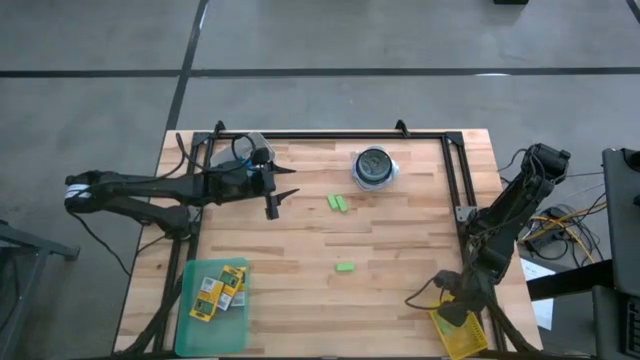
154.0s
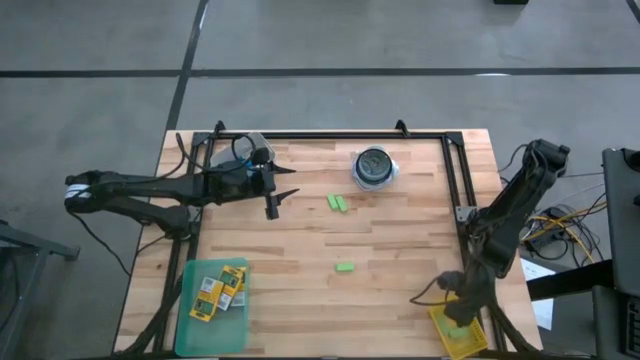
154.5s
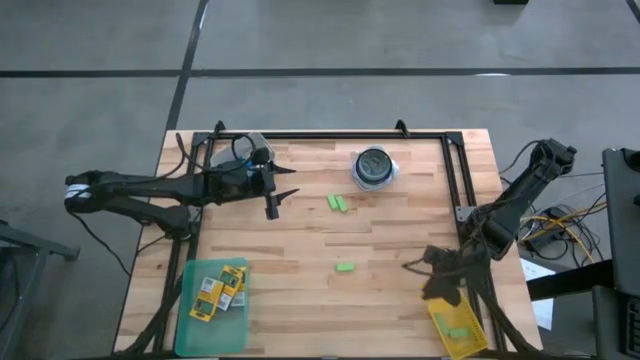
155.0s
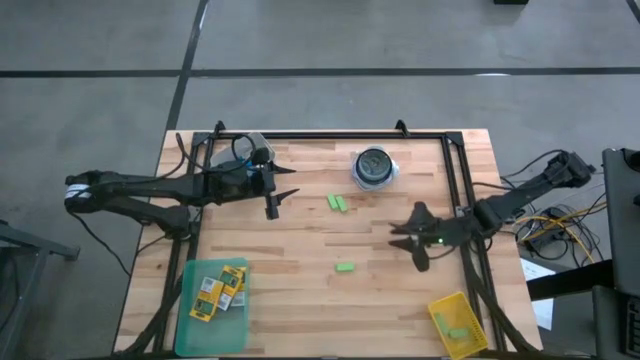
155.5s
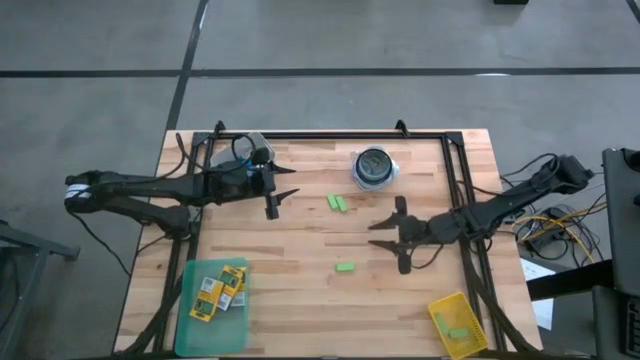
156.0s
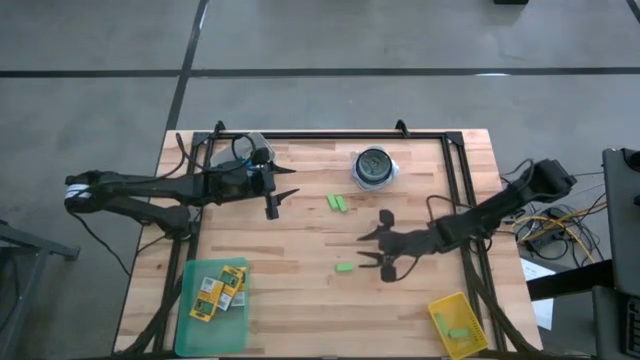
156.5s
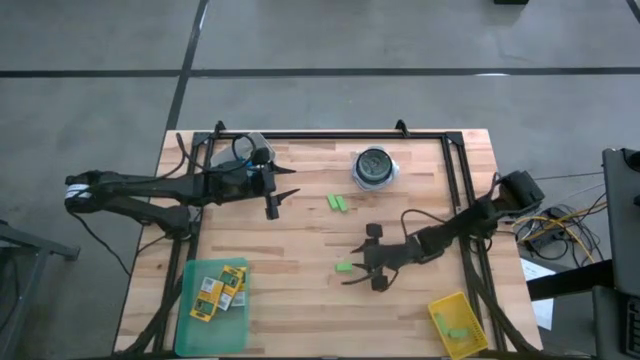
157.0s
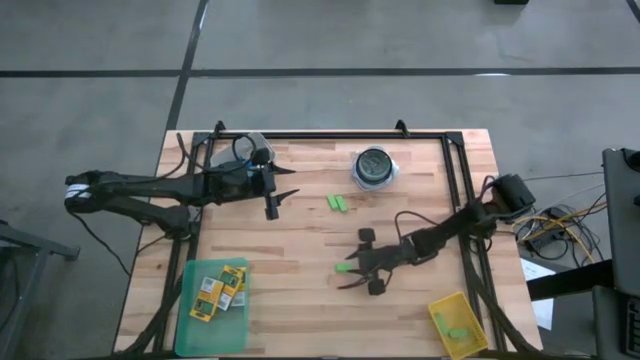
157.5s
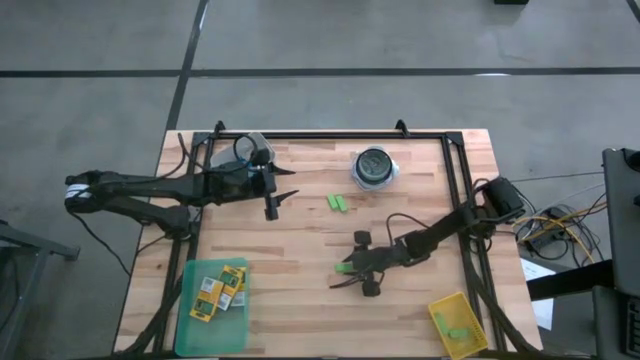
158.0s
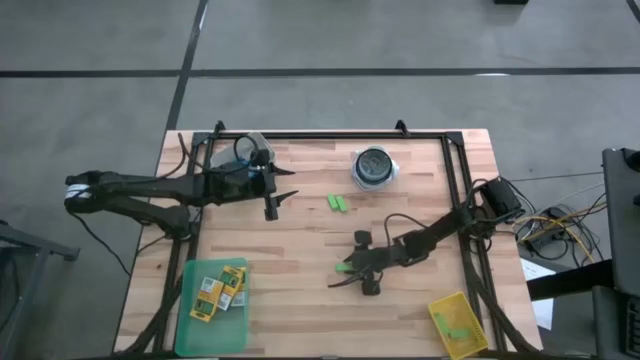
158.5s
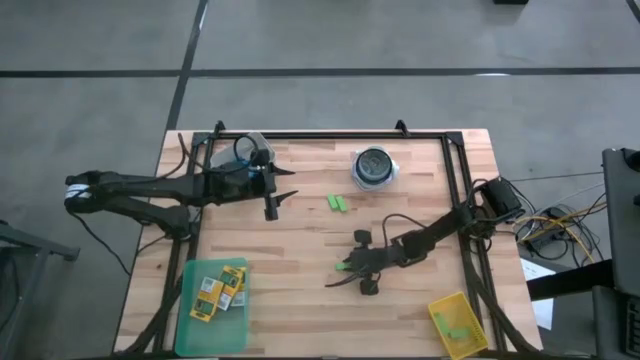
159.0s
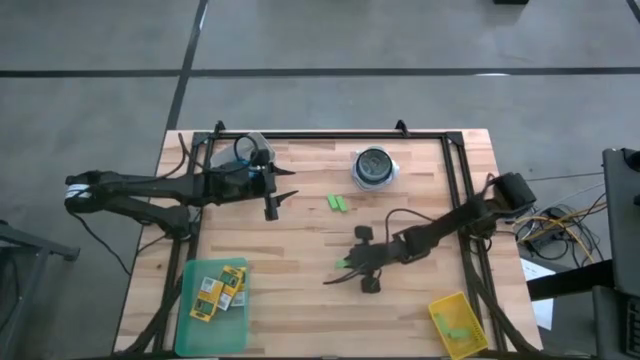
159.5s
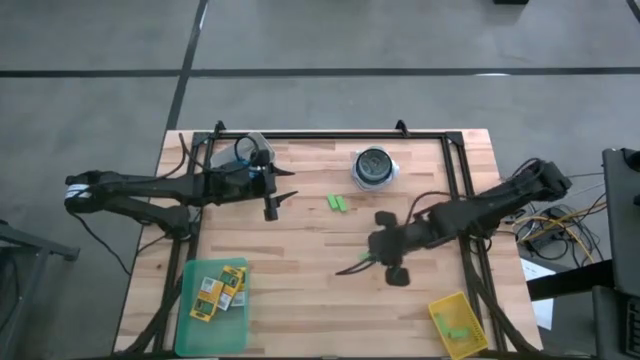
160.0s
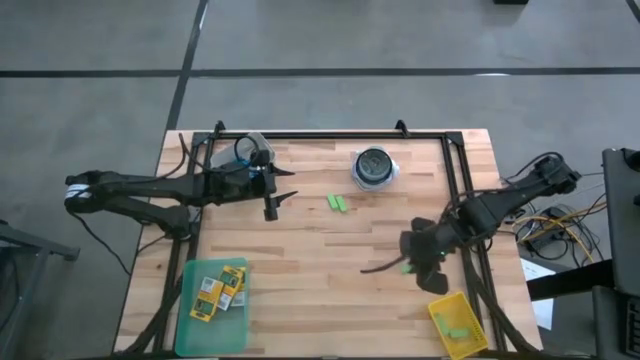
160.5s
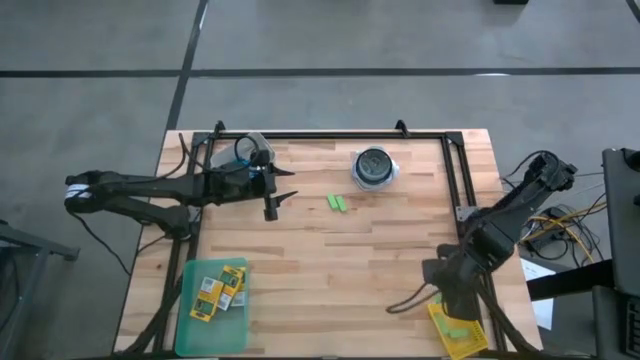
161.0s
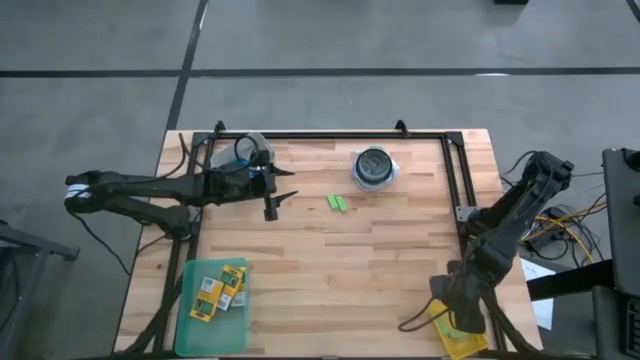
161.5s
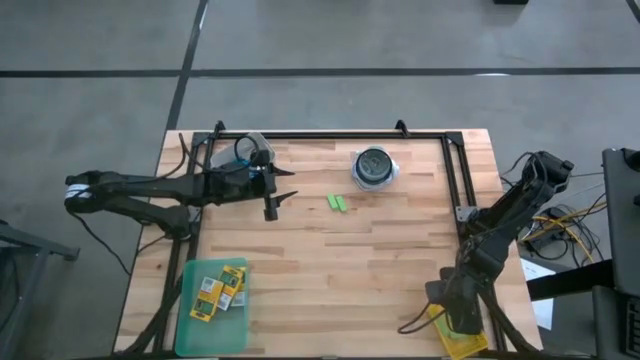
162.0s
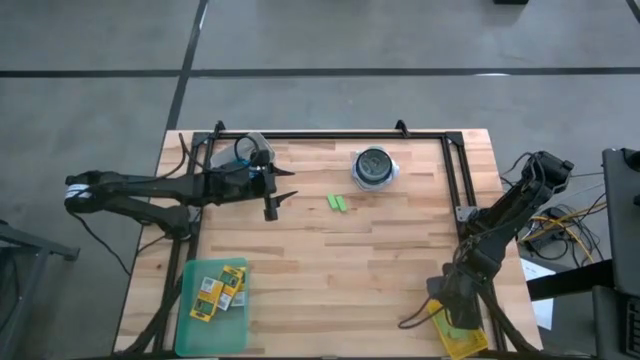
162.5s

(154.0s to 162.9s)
Task: Pick & Place School Supplies
Put the green eraser into the yellow bin

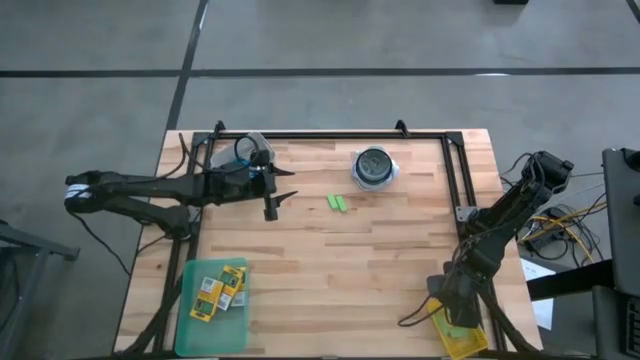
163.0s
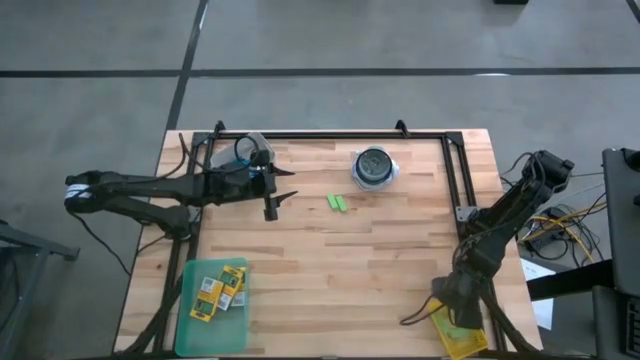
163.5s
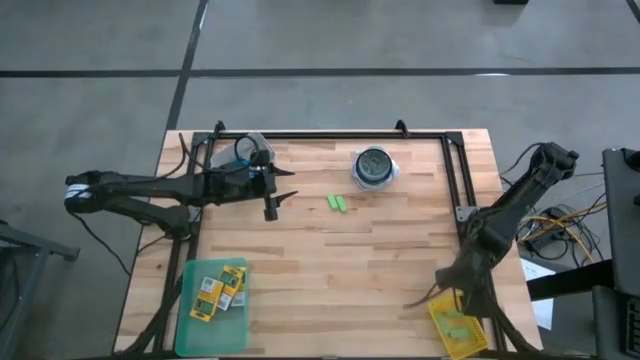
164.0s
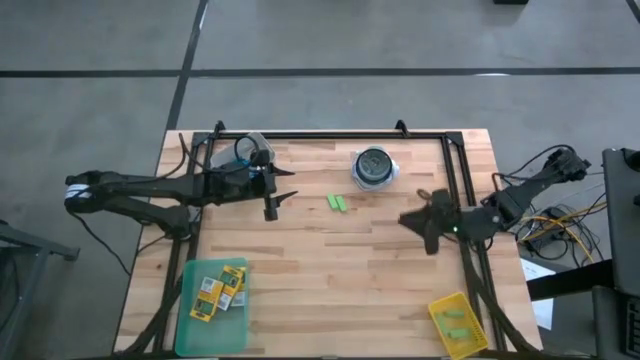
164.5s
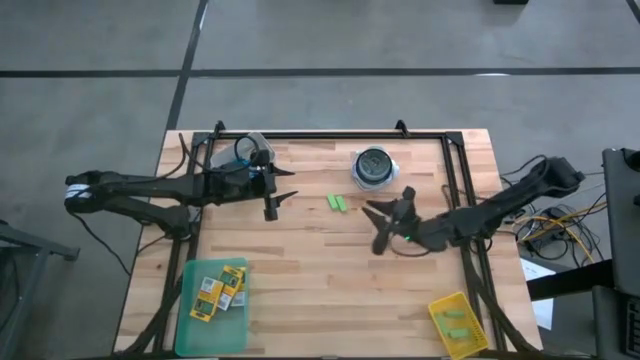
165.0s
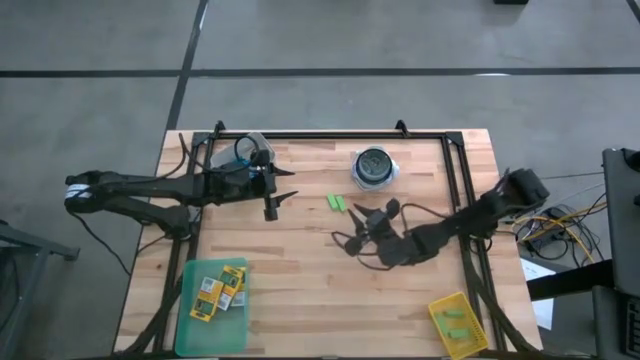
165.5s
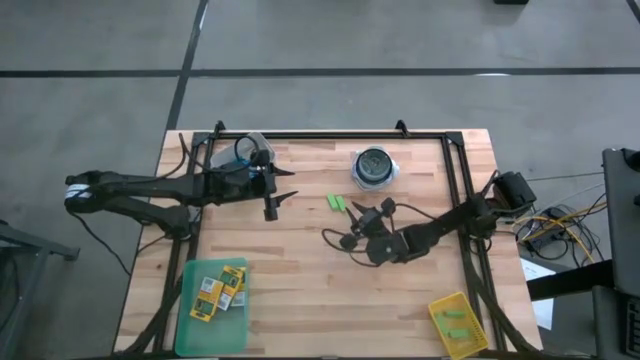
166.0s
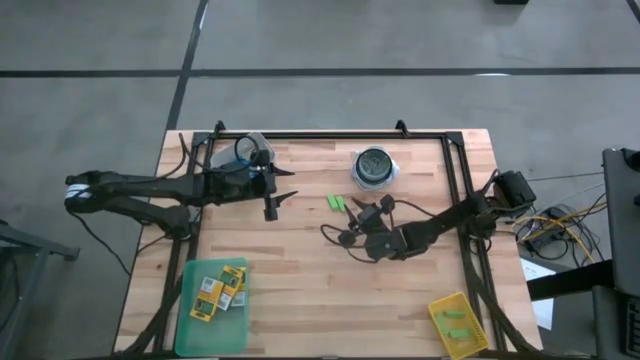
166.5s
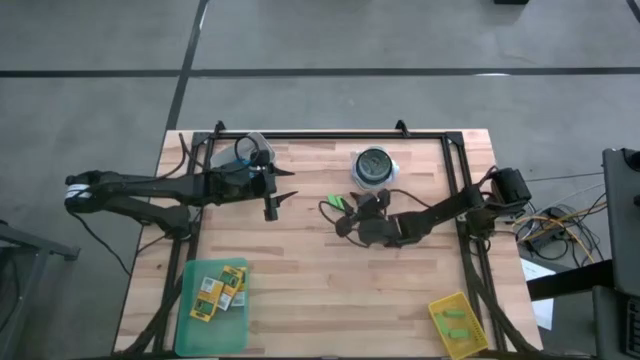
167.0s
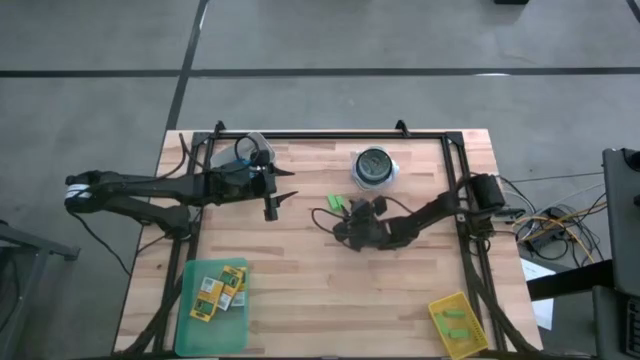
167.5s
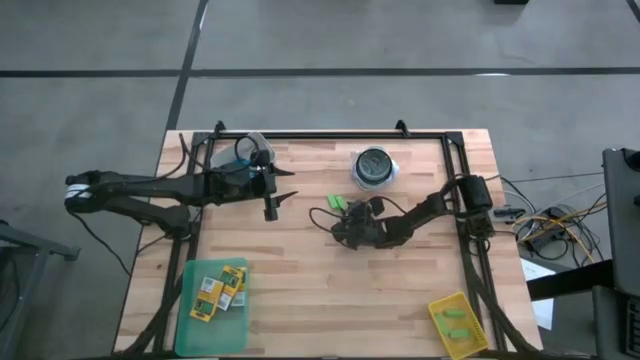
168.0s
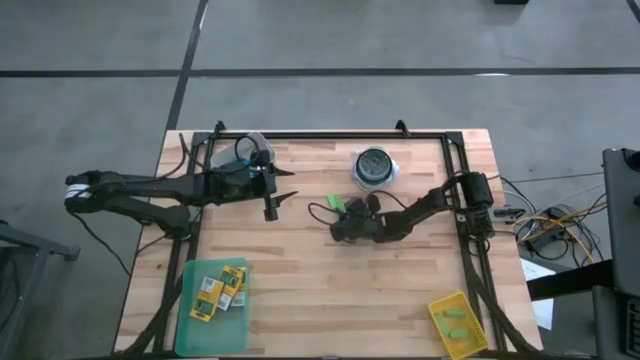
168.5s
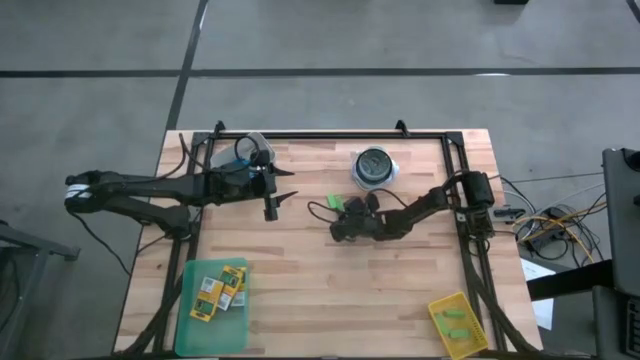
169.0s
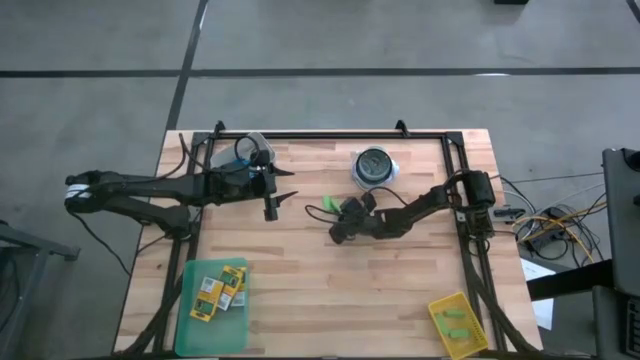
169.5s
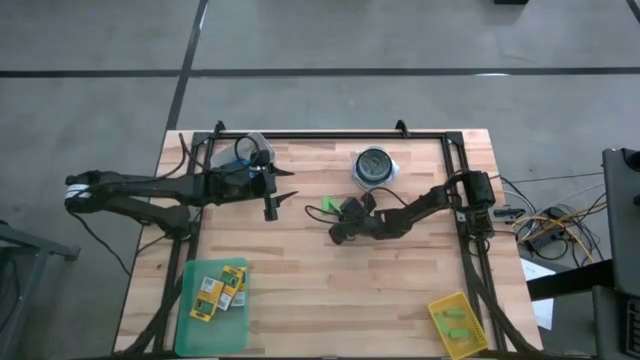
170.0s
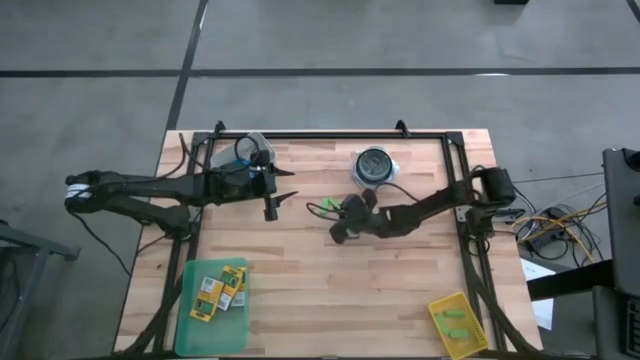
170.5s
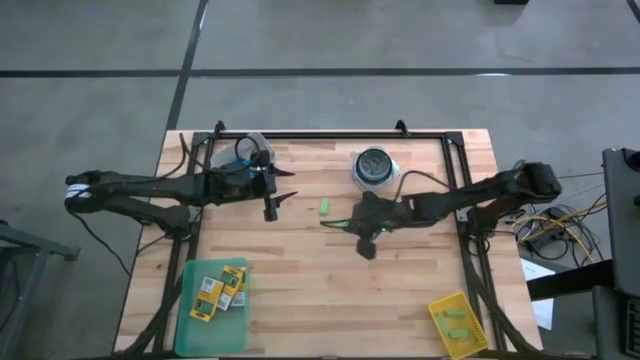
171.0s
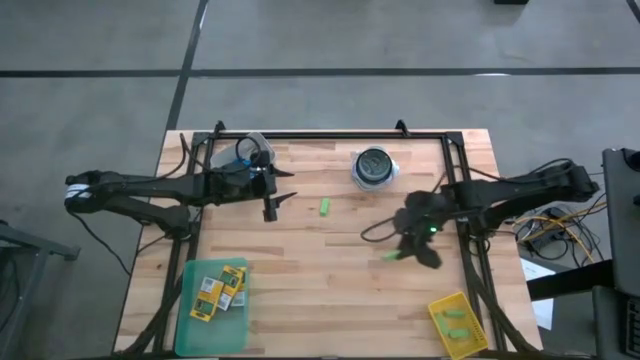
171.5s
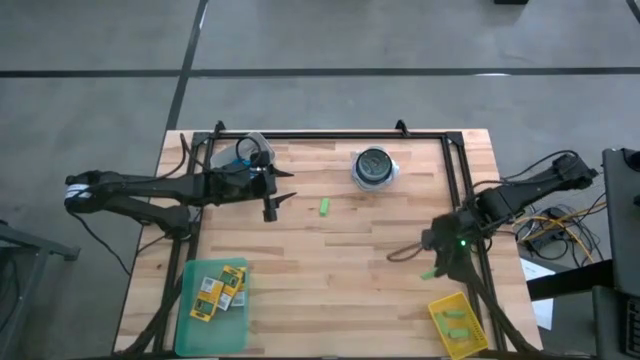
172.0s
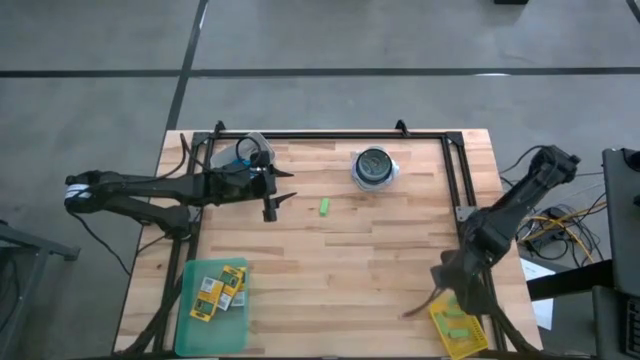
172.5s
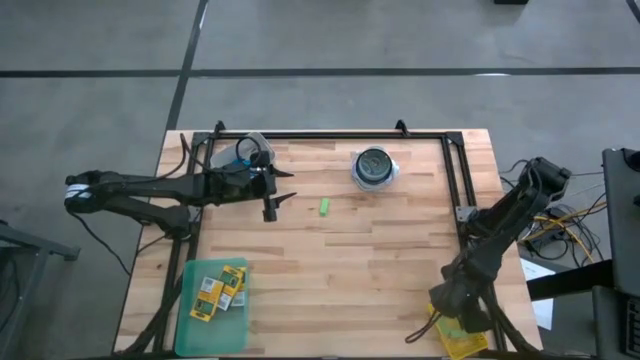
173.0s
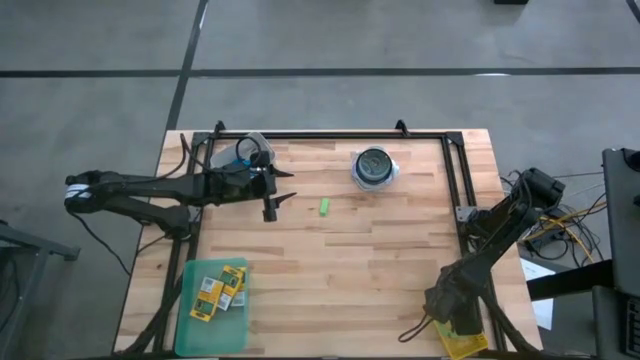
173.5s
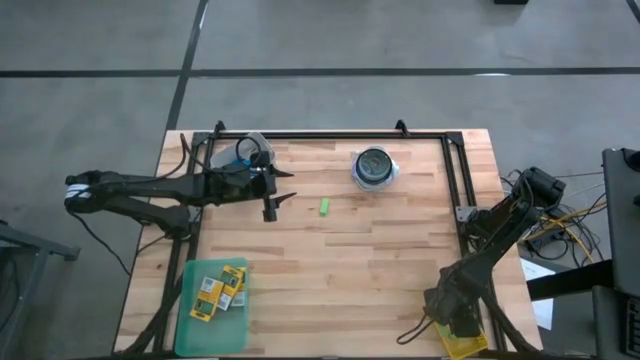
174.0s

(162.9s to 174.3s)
Put the green eraser into the yellow bin

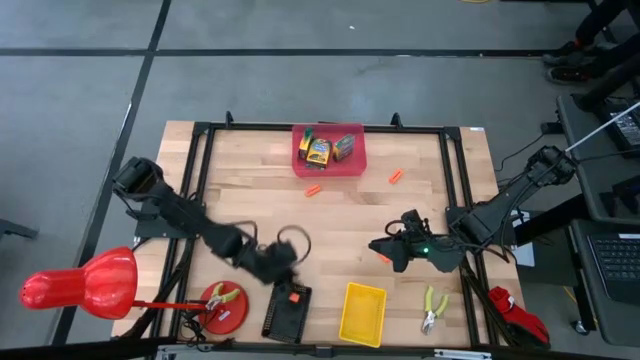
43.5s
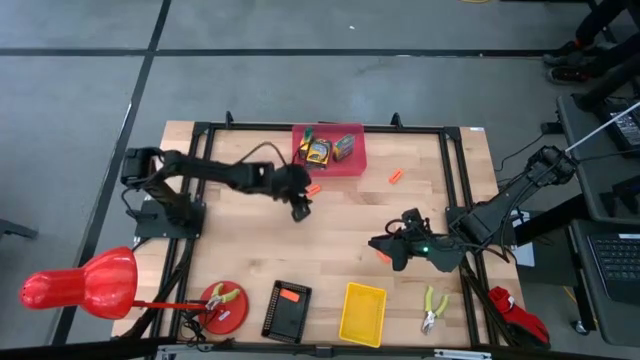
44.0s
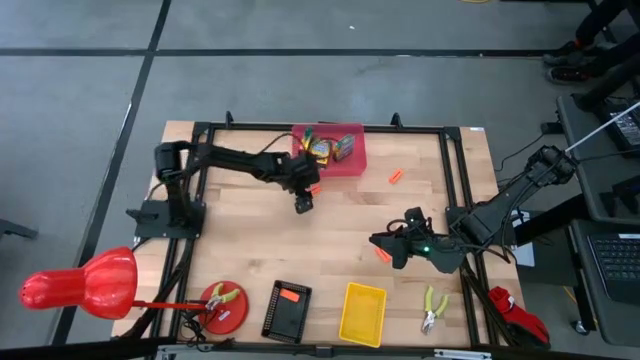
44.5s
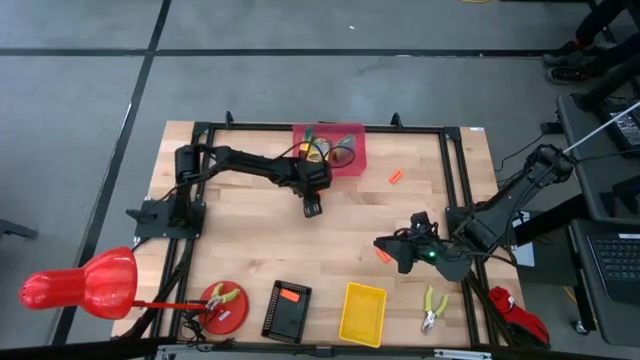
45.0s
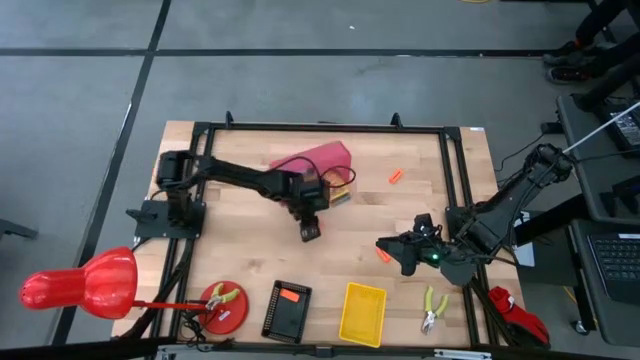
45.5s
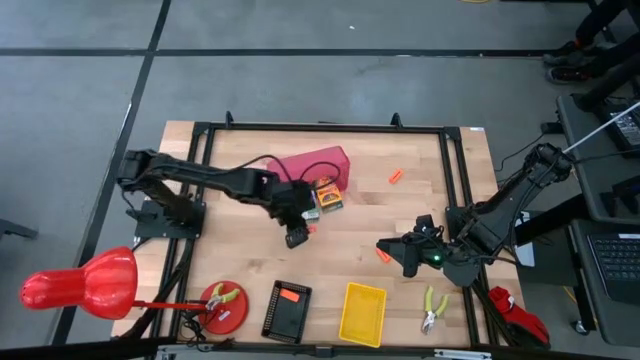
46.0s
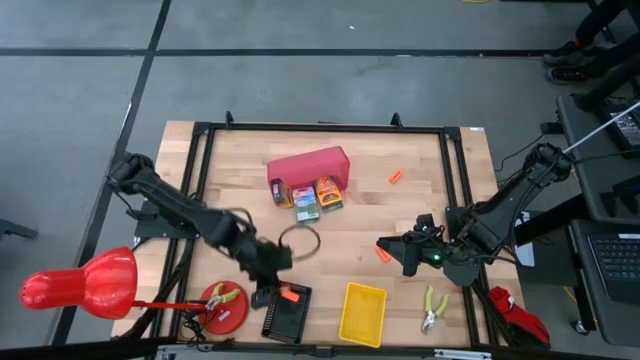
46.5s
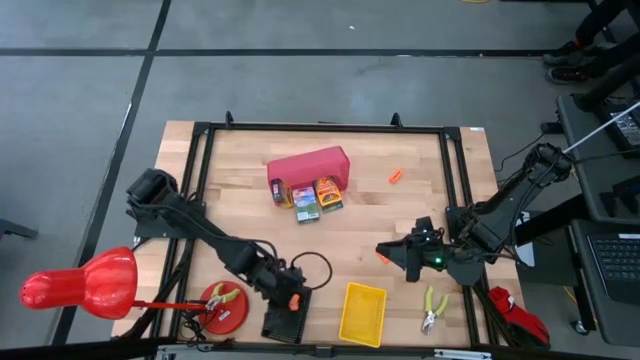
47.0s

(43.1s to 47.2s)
Task: Pick & Place School Supplies
Put the orange eraser into the black bin
